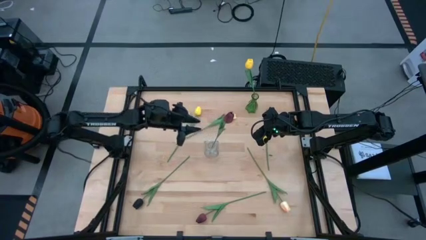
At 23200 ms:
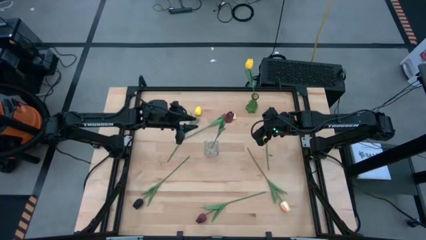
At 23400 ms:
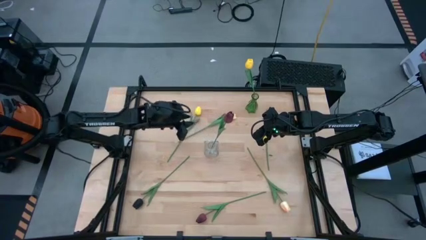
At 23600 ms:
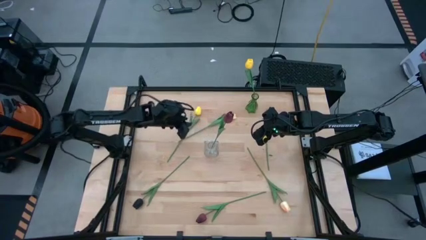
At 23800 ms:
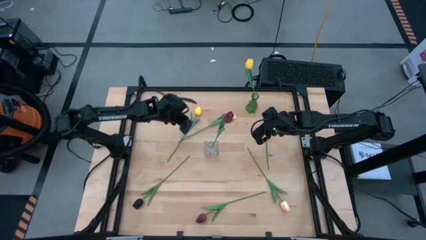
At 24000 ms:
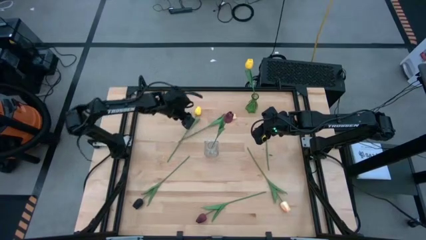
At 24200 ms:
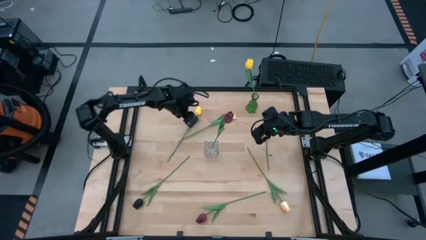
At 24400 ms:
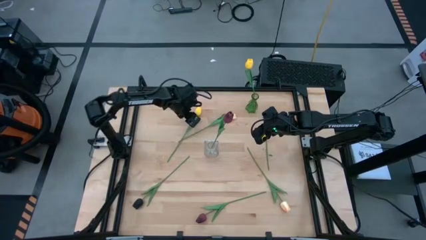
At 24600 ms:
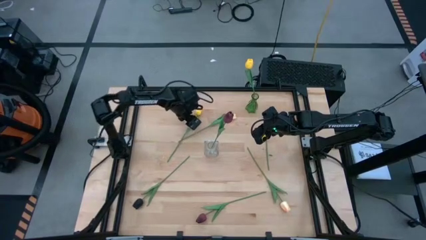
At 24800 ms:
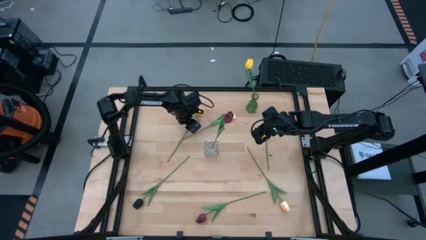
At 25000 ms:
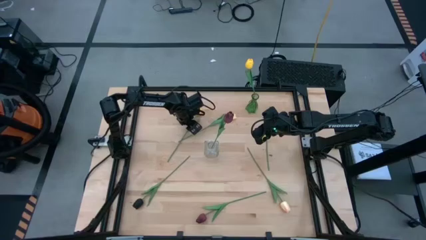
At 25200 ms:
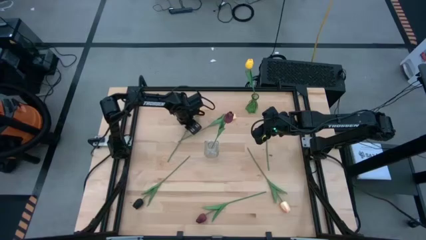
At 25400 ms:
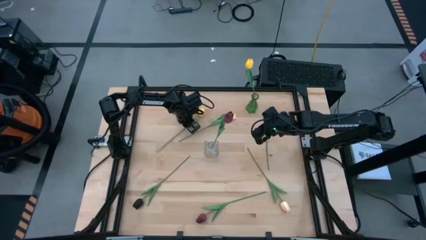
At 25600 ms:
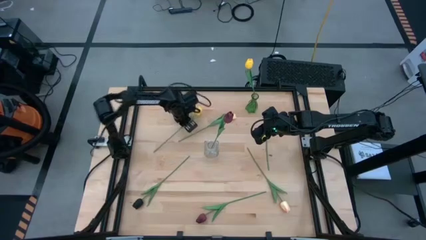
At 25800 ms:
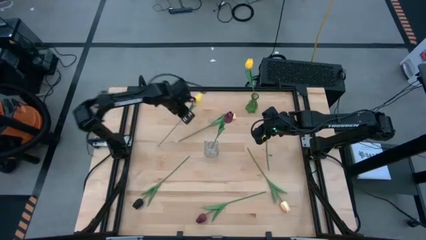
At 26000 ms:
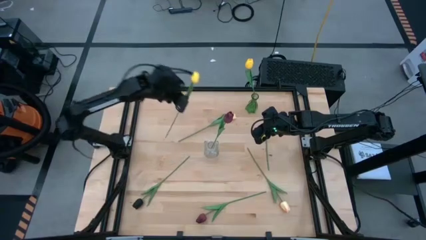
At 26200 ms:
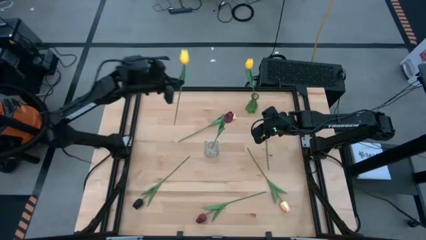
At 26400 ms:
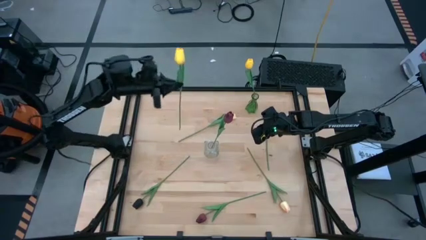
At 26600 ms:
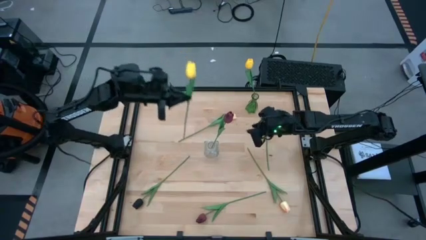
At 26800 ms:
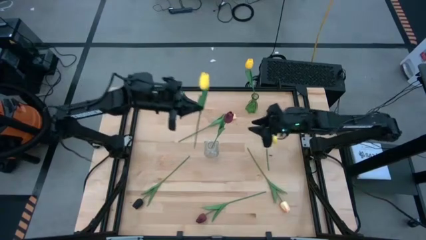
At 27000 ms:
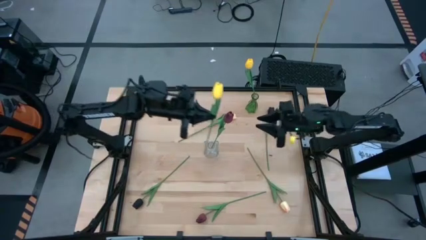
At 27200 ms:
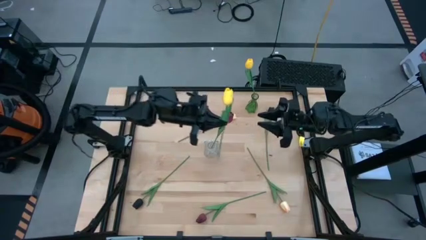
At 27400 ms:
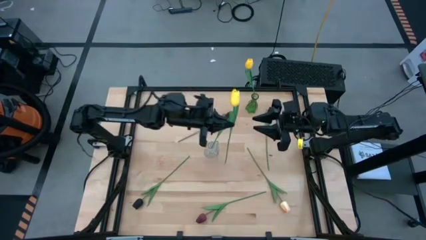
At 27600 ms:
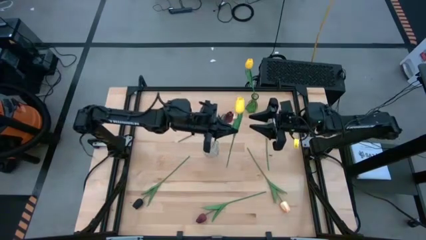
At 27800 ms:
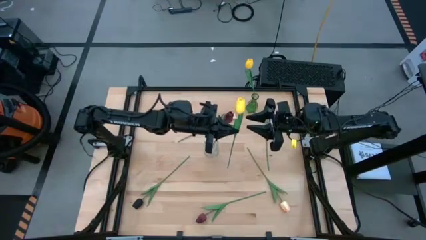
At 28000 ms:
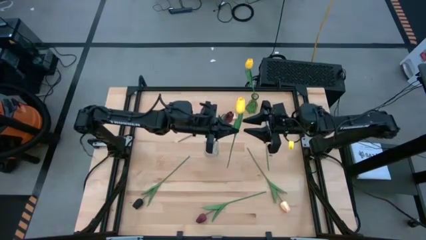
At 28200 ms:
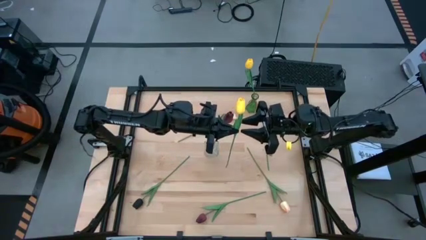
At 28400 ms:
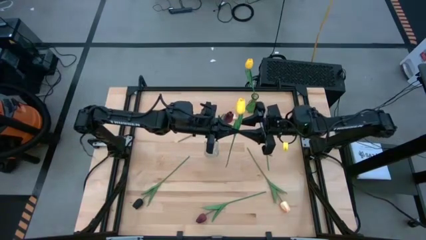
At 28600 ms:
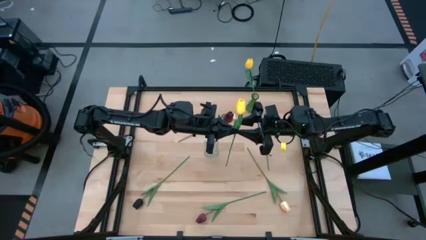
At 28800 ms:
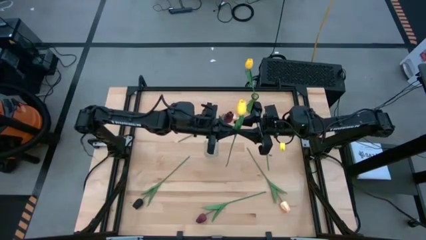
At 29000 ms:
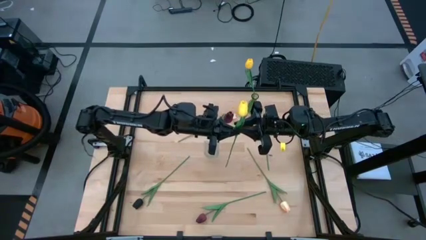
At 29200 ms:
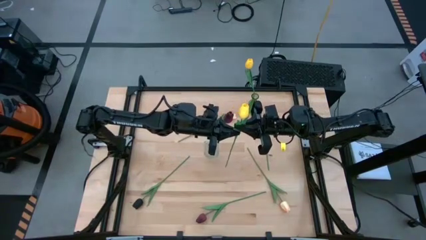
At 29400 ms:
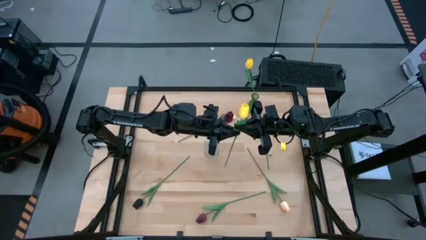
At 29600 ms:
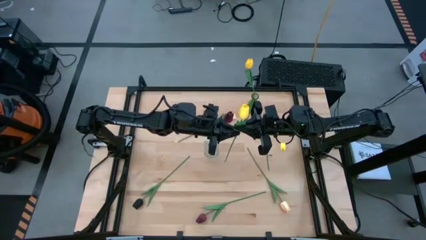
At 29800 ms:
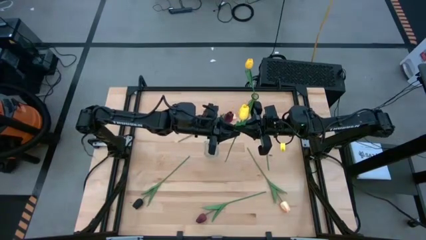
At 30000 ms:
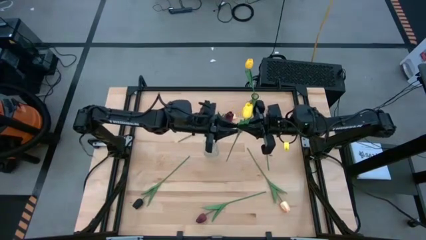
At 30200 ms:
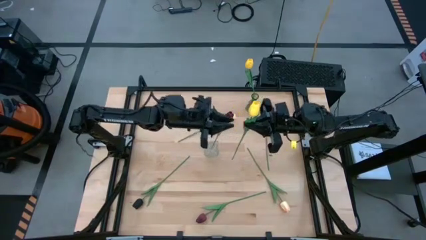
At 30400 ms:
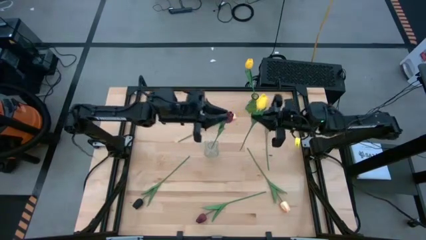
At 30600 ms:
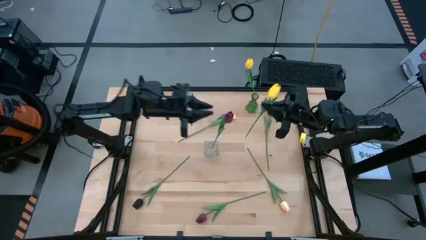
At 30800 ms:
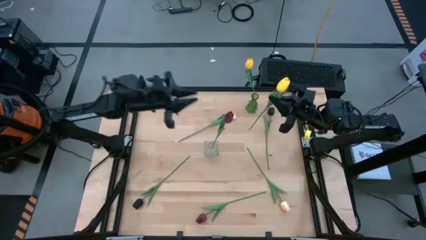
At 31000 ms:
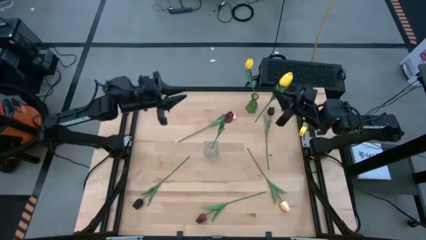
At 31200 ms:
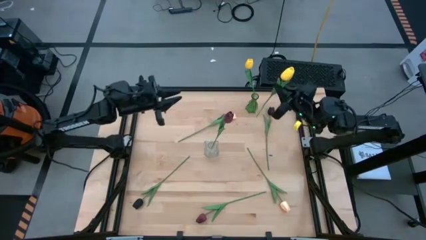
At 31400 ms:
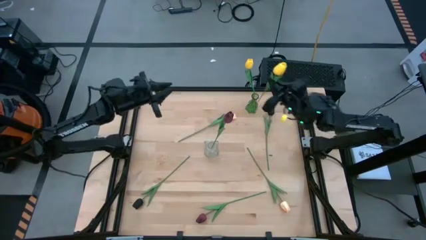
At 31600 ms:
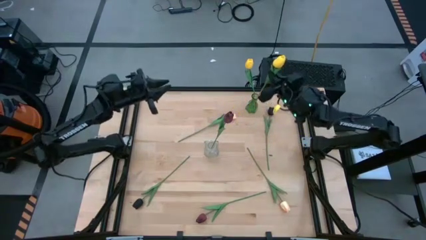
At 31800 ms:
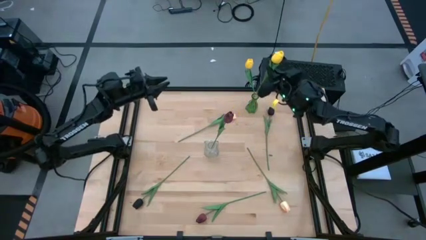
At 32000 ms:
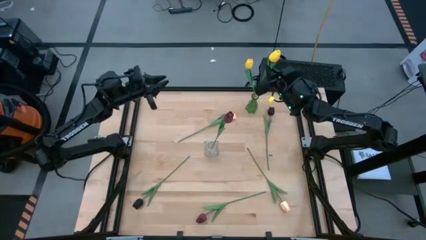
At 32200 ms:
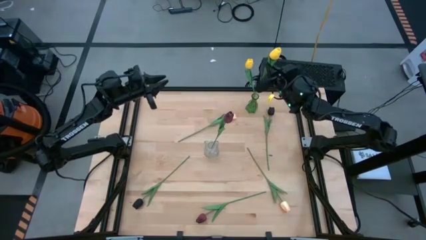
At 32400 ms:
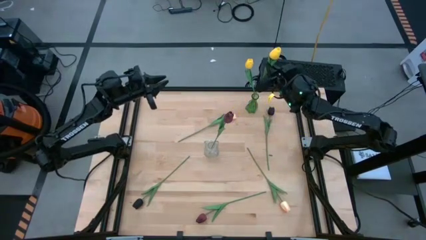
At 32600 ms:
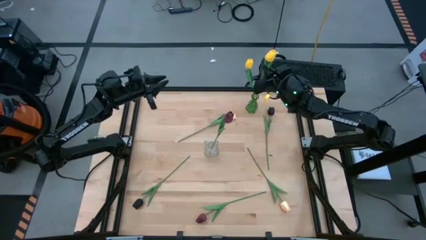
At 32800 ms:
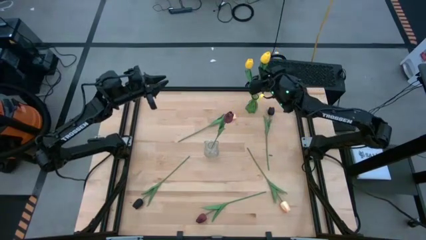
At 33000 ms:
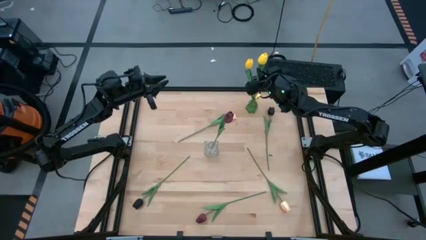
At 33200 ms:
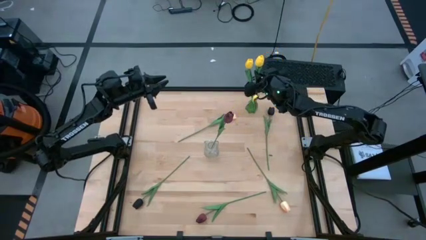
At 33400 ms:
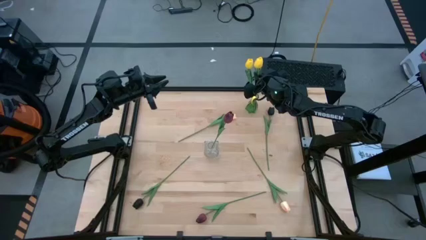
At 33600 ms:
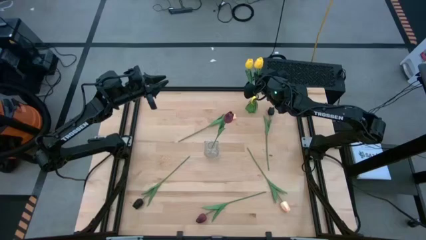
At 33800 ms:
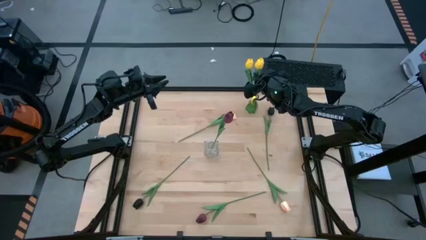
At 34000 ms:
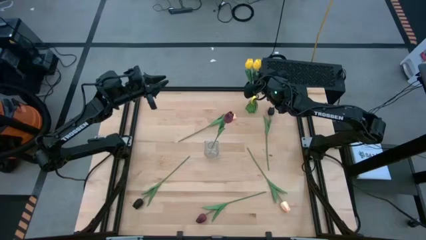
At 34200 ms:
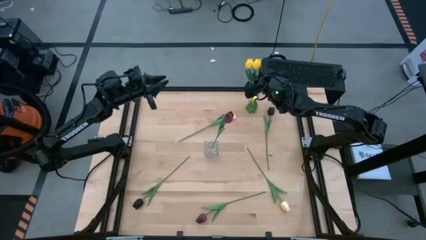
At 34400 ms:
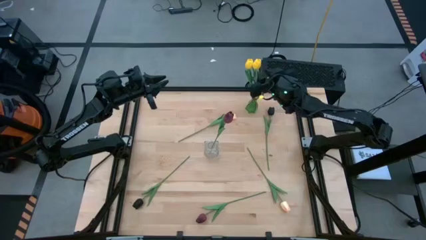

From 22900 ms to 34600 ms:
Task: Sort flowers into vase by color
Put the yellow tulip into the green vase
